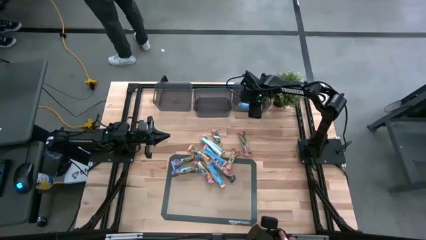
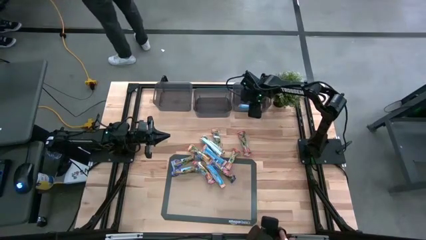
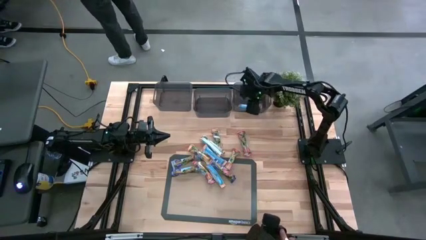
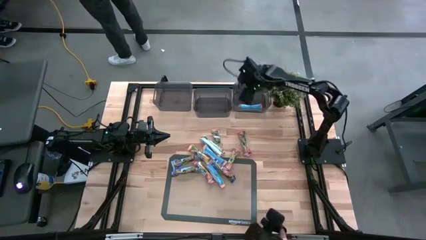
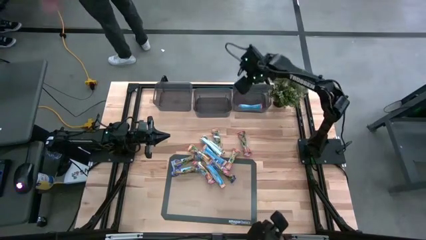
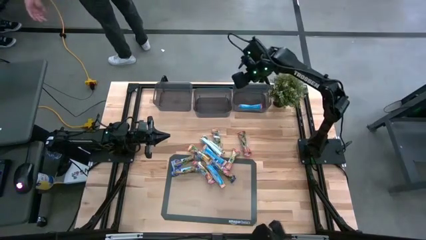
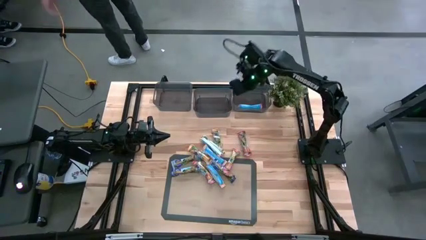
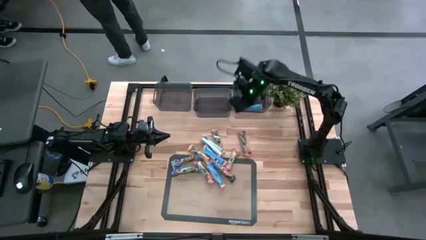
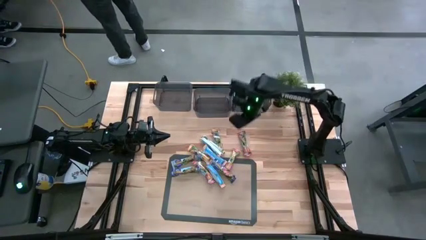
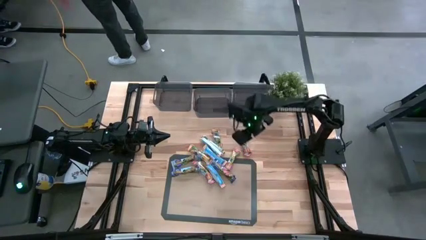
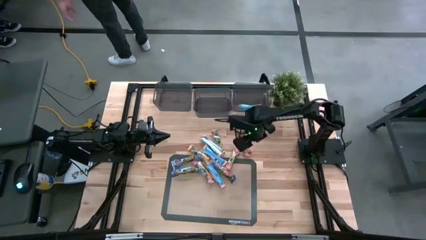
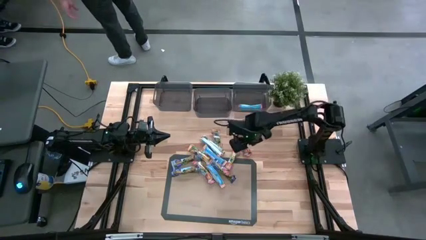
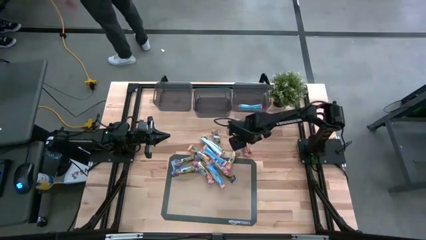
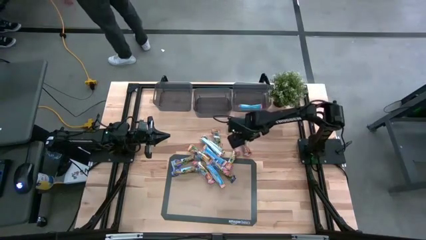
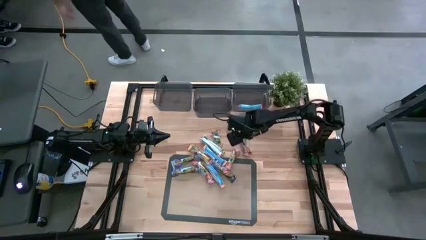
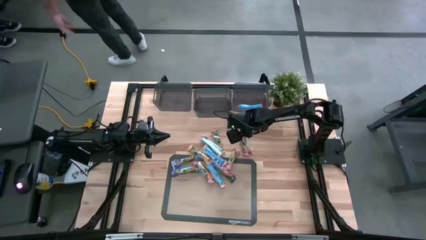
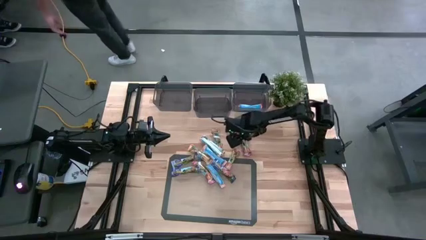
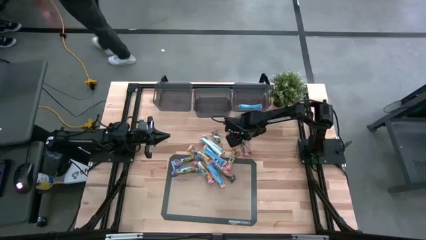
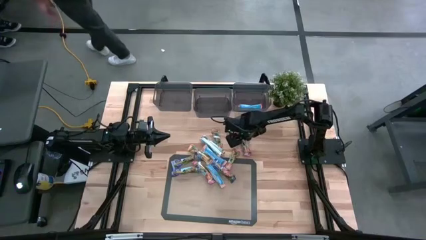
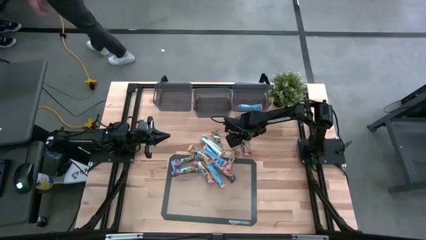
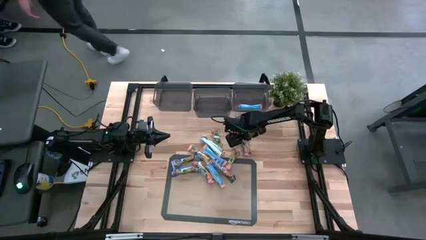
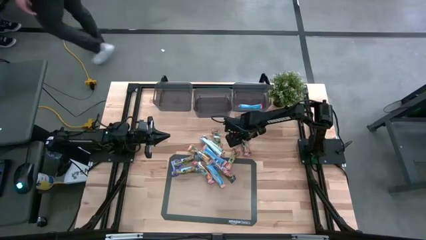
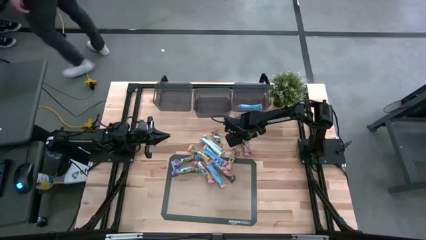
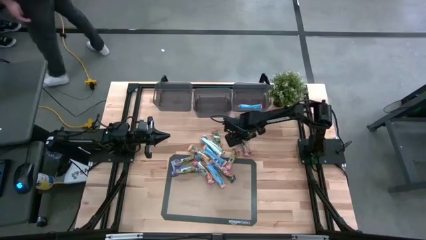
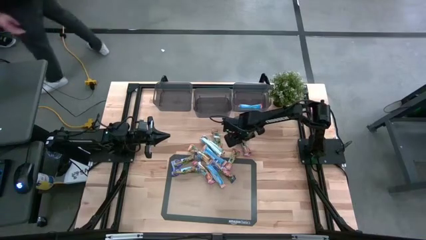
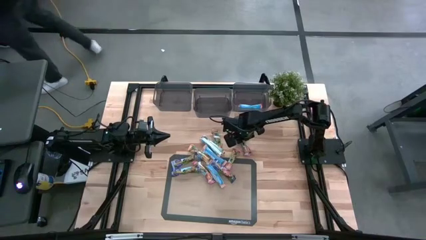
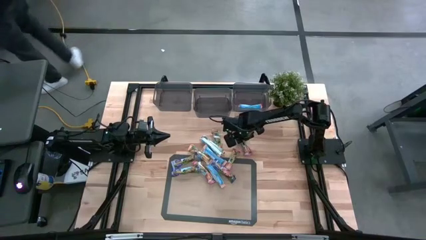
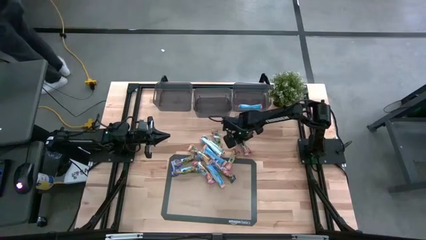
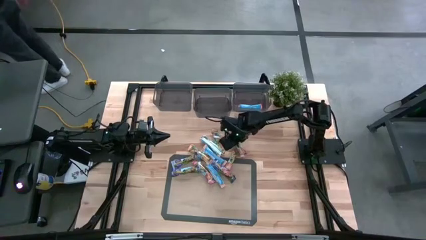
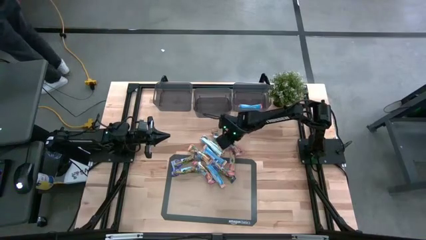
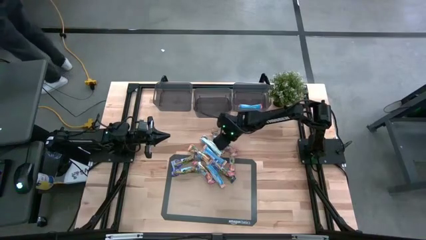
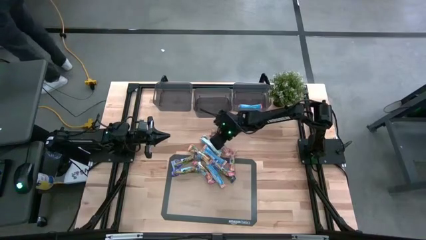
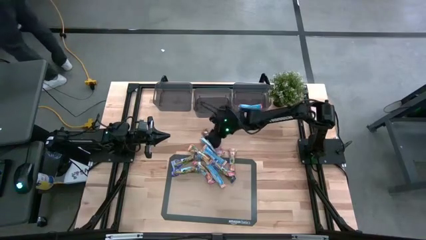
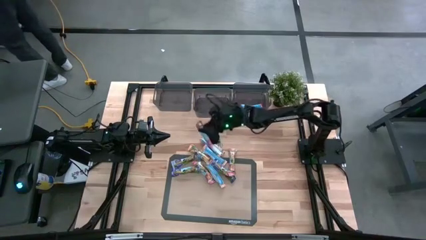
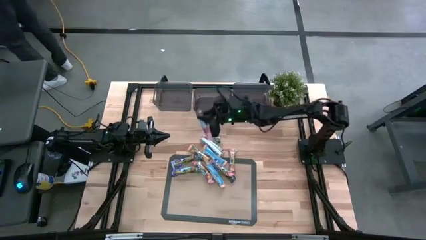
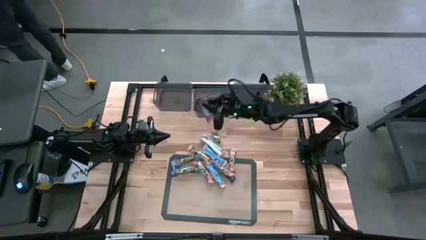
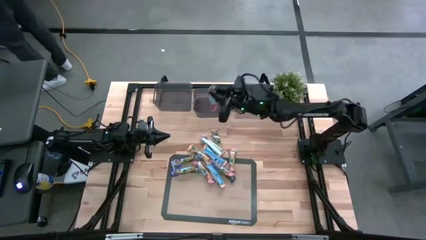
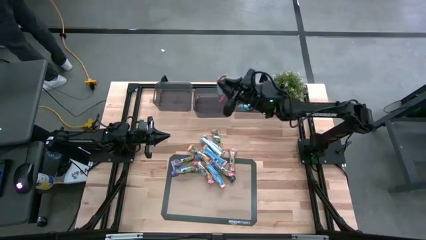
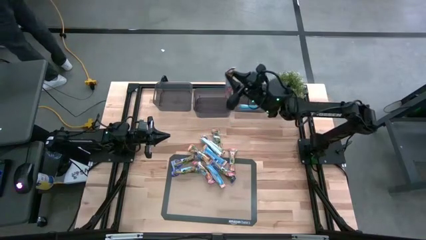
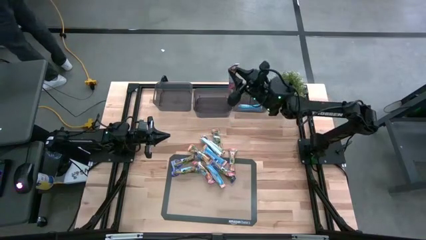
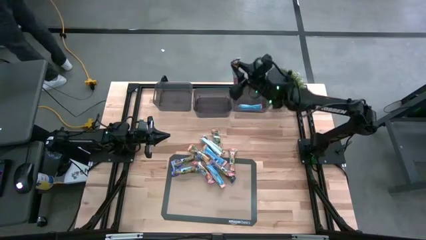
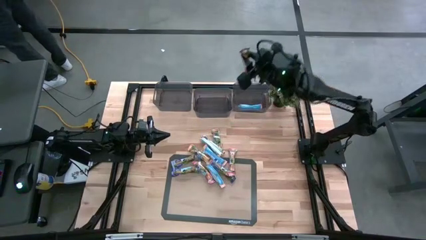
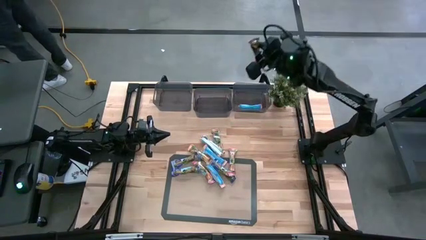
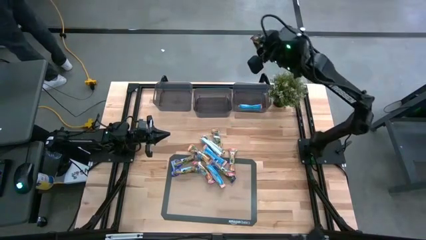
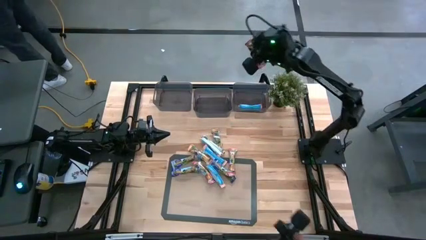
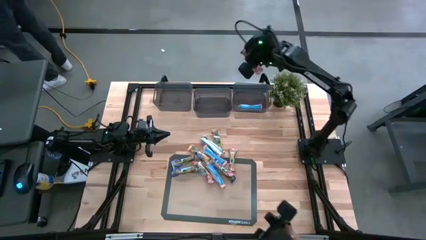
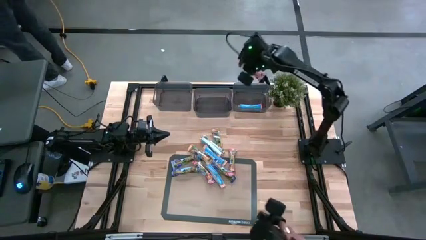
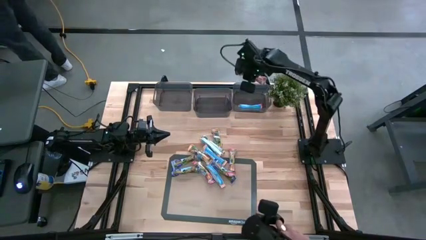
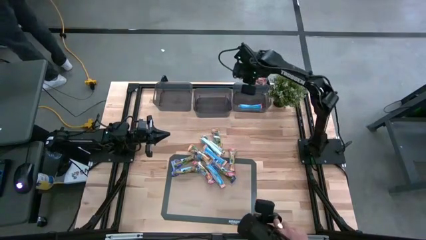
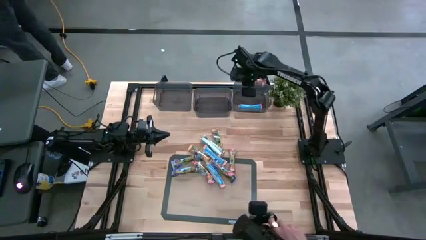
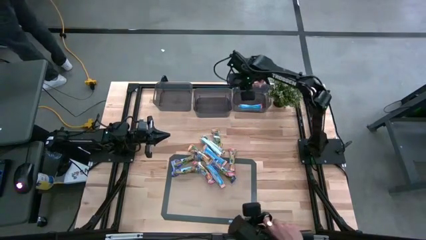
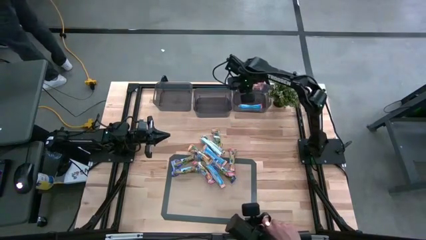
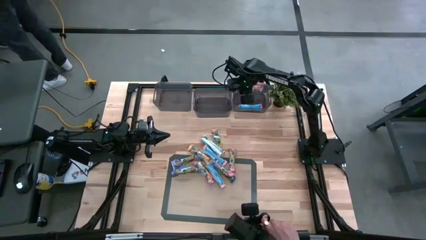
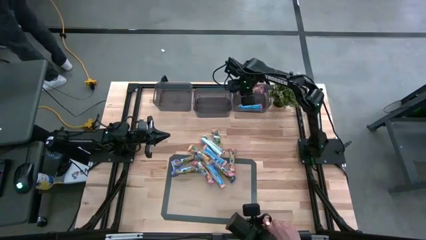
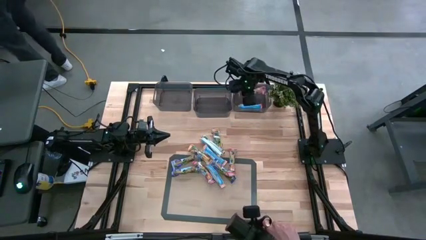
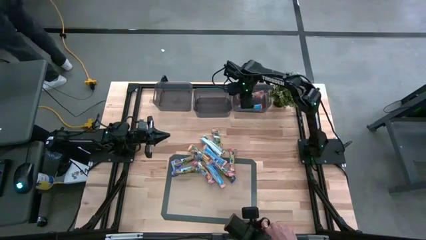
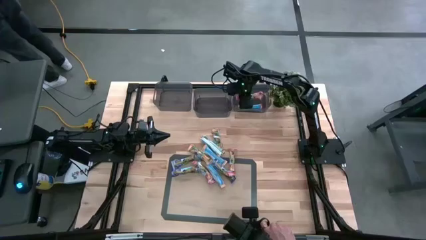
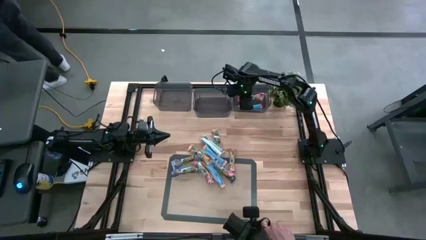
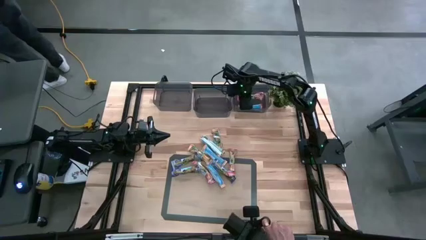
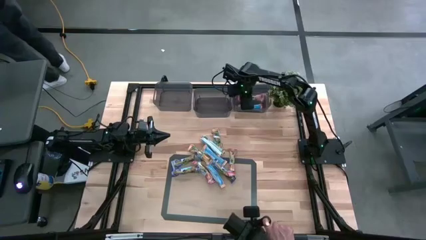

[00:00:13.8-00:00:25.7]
Task: Pick and place Granola Bars by type
Put the red granola bar into the right black bin
